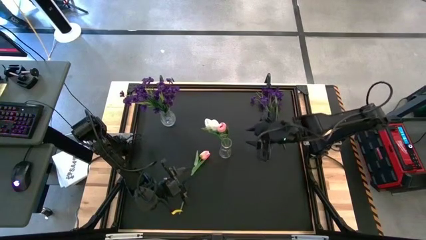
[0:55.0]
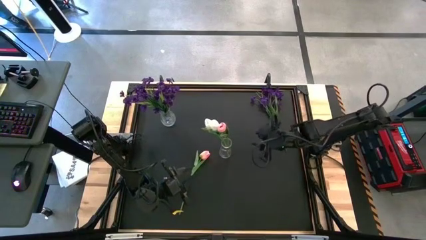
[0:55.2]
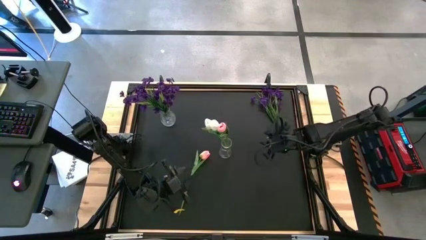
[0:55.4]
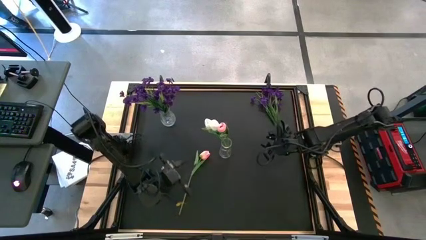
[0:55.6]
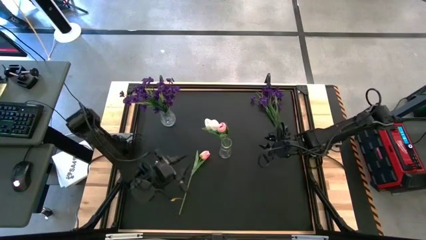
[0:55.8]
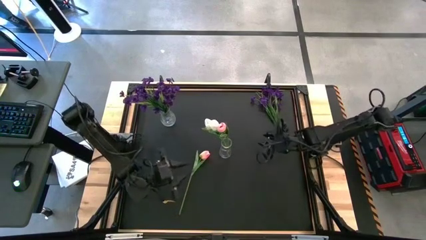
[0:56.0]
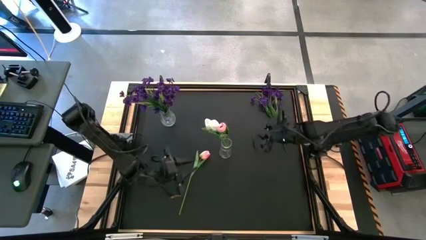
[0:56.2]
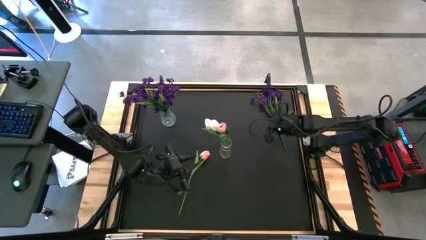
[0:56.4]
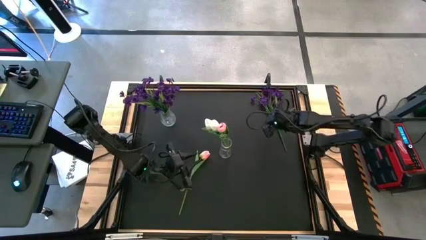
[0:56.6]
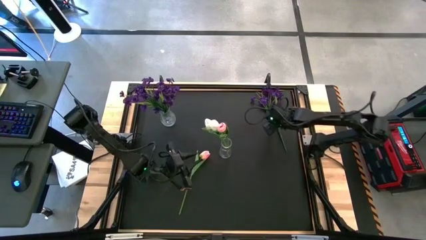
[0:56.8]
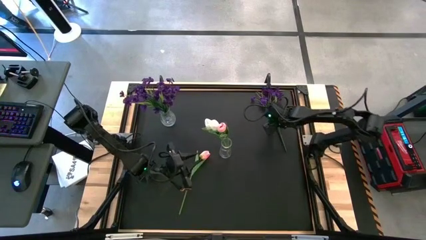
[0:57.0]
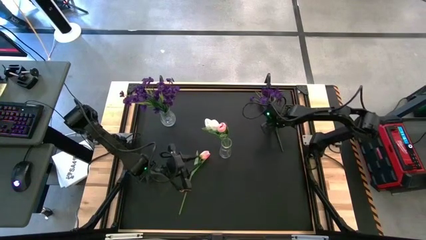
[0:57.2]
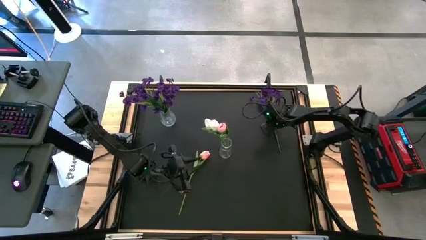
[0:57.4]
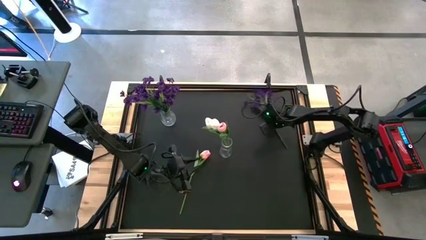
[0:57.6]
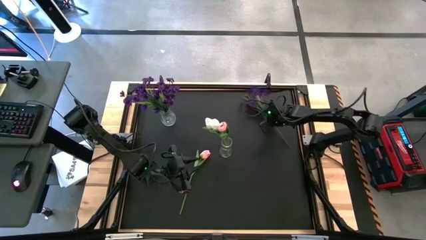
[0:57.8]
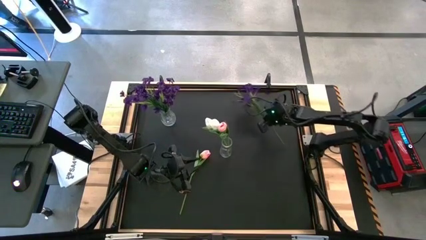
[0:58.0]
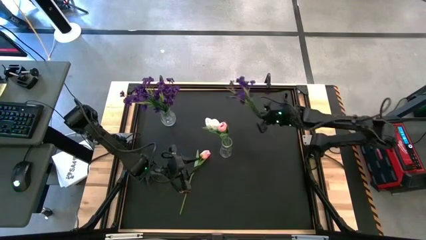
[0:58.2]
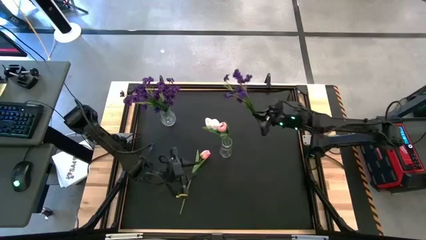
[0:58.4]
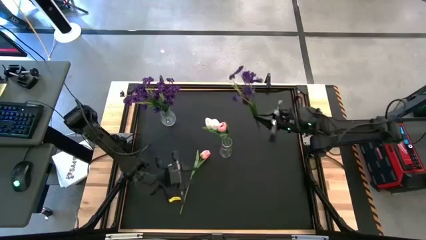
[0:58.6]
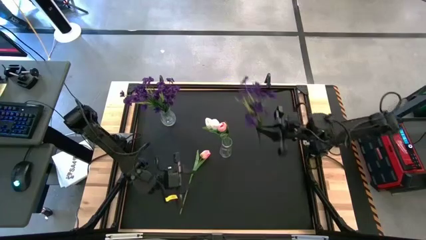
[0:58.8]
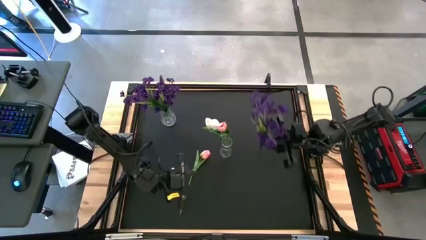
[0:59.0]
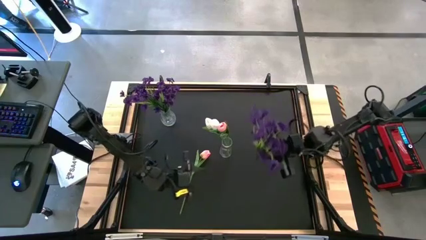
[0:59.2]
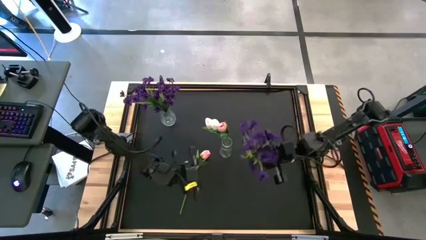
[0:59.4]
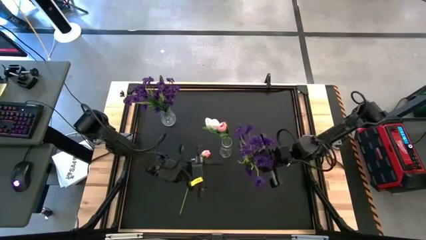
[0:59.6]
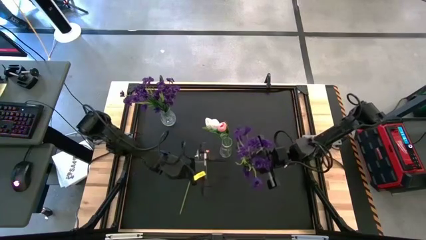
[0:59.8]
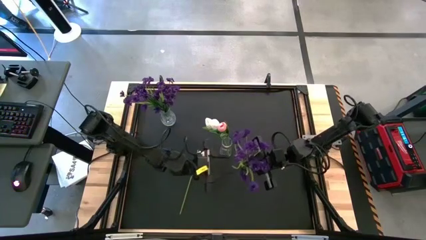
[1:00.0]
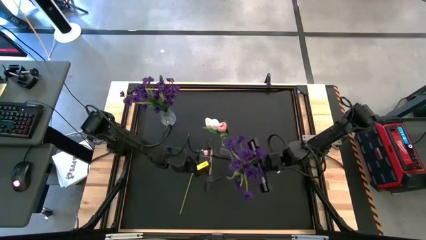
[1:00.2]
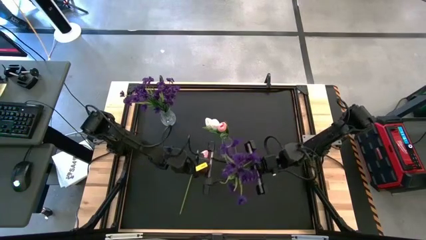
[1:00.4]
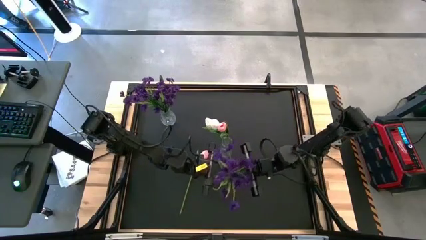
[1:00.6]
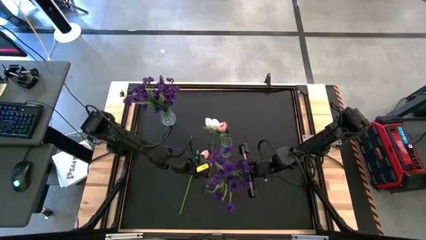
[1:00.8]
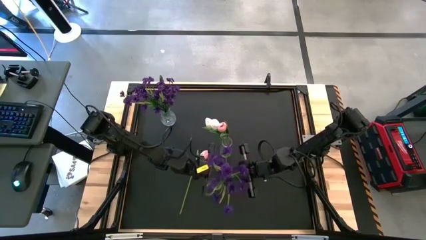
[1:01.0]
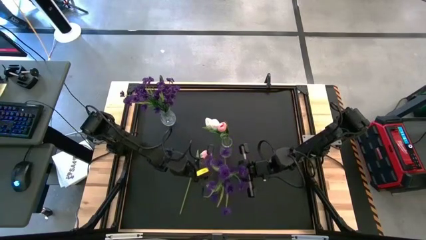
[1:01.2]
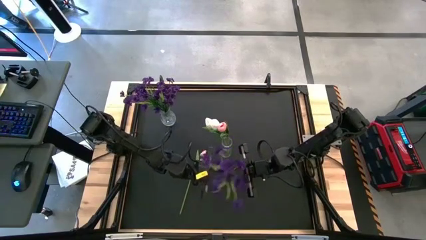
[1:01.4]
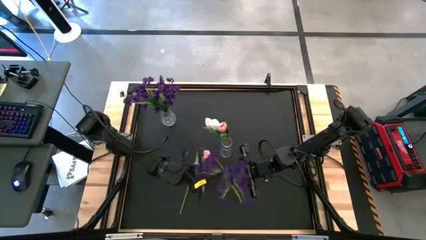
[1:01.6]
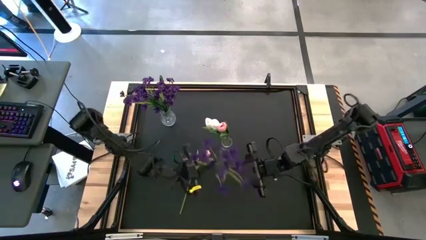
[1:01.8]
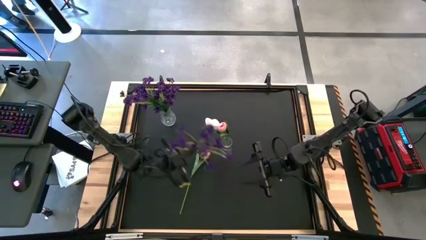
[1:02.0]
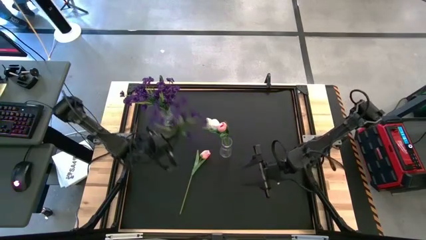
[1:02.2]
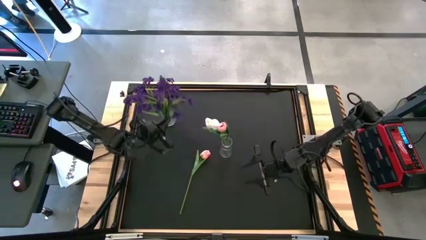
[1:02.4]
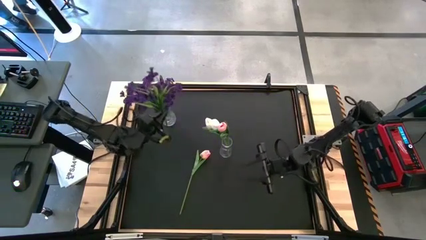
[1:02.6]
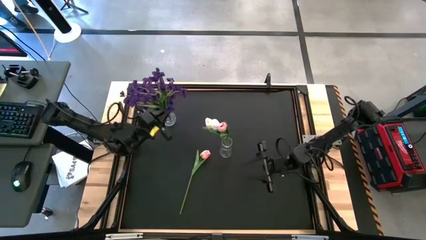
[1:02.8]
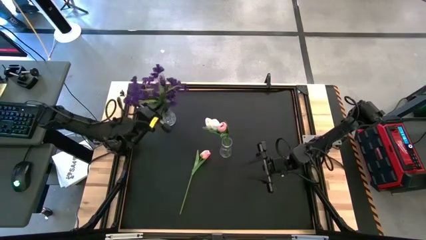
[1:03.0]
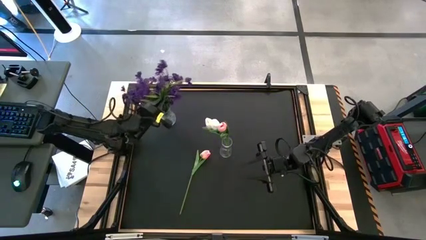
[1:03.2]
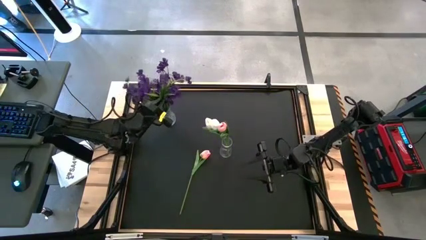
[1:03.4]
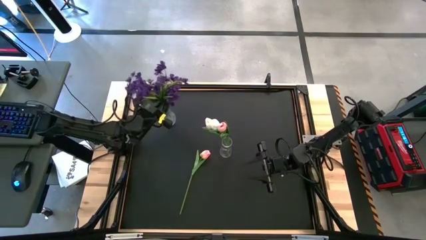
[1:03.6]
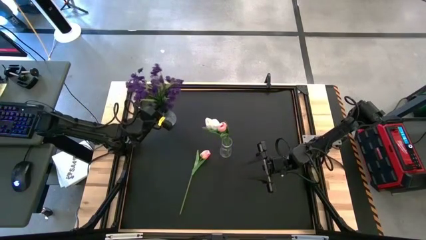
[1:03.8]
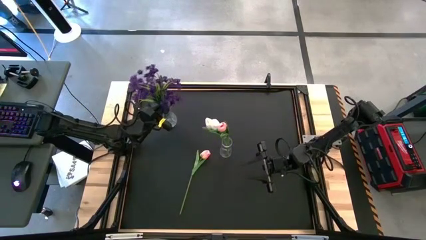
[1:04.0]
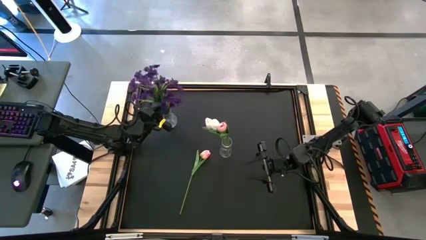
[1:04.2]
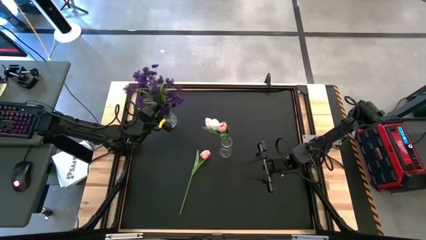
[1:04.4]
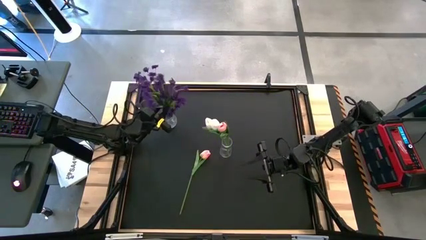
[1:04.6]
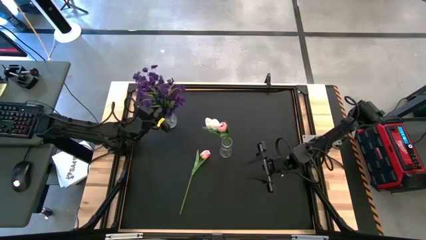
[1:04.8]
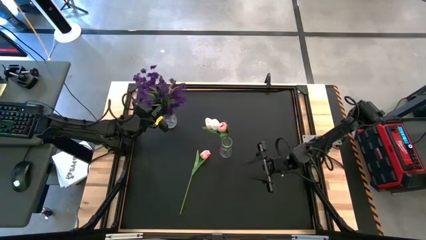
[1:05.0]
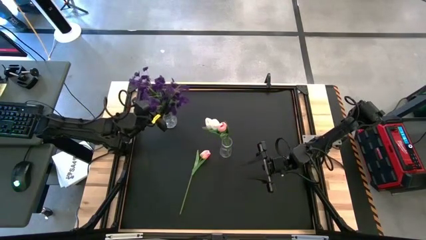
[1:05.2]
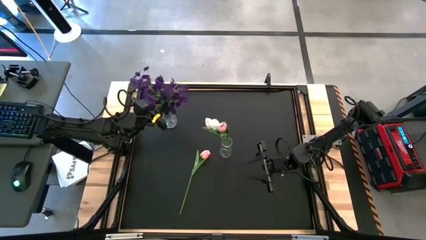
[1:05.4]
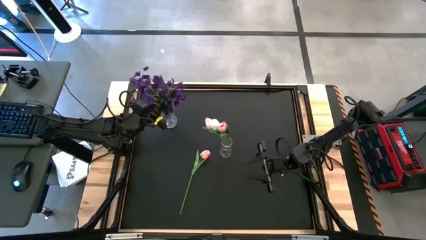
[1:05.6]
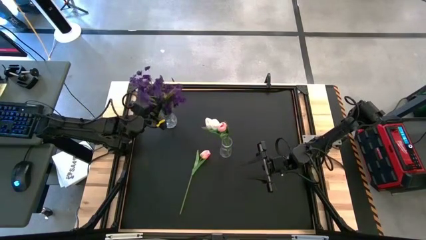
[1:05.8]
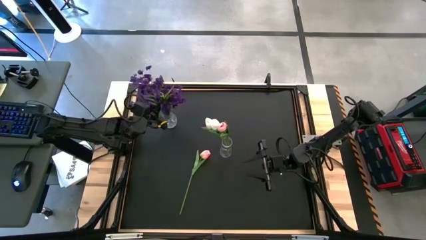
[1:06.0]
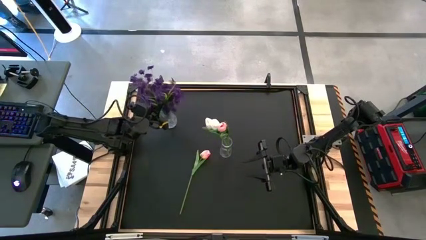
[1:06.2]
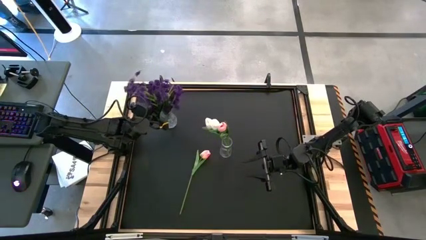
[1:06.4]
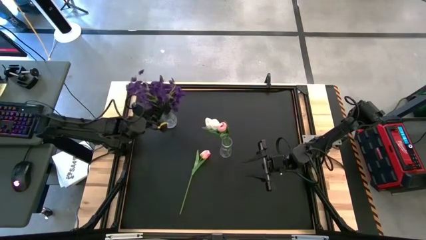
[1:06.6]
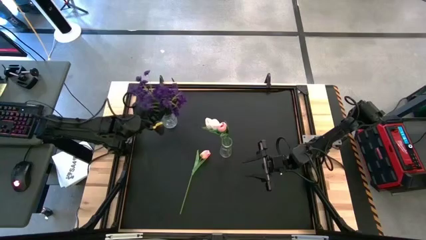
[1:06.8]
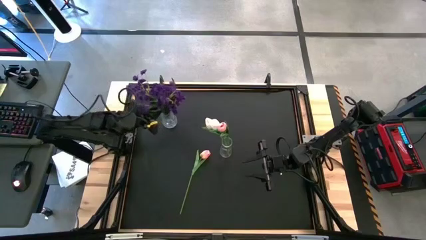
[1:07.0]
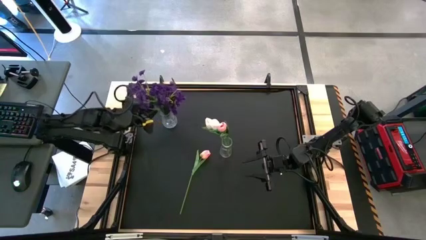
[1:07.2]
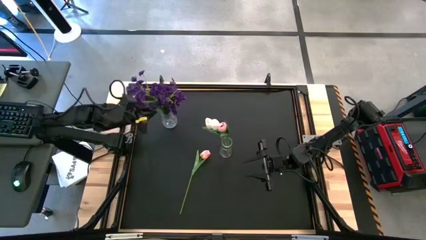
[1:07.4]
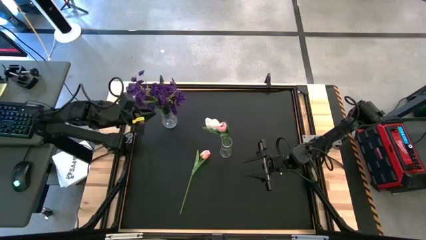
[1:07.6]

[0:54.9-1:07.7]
Task: Sort flowers into vase by color
Put the violet flower into the left transparent flower vase
